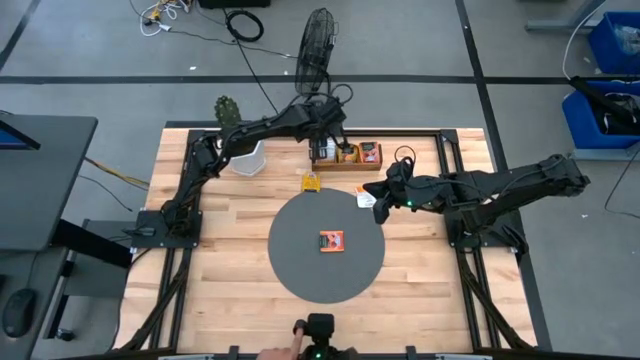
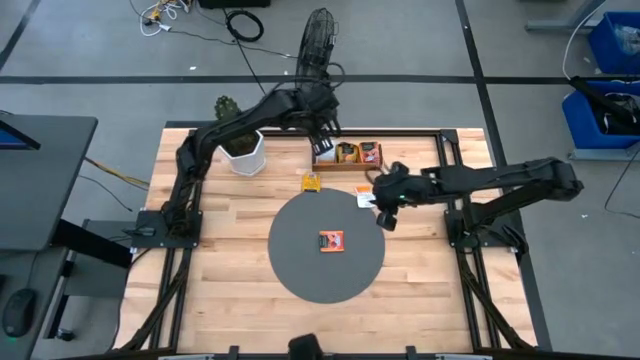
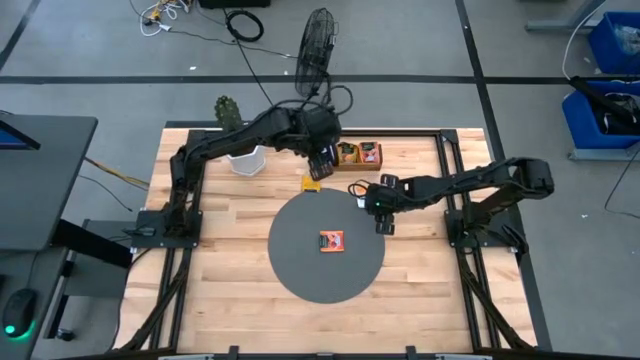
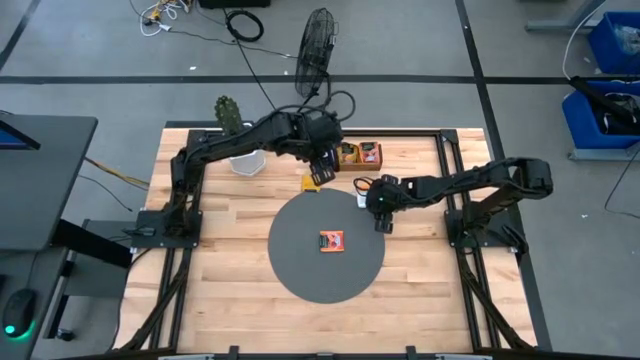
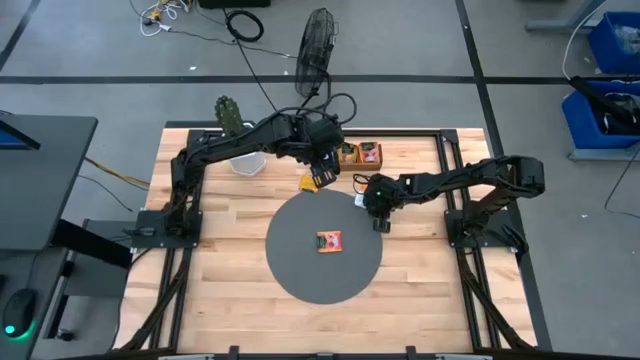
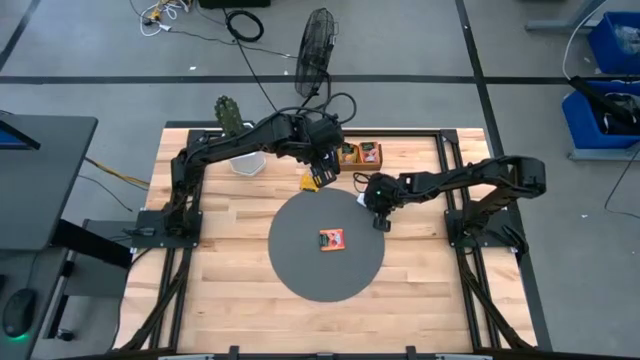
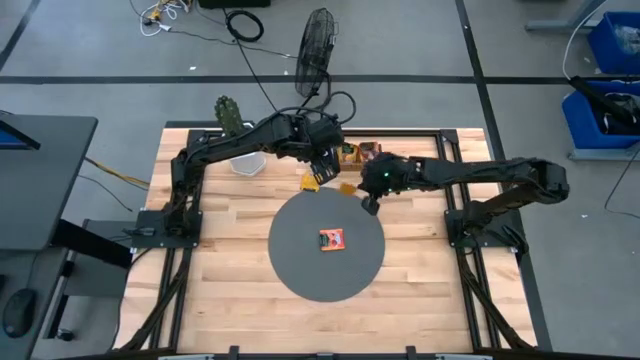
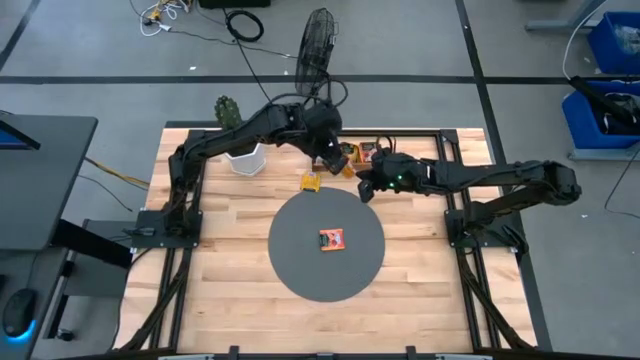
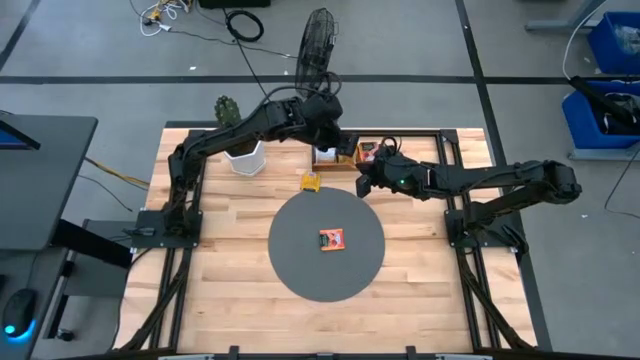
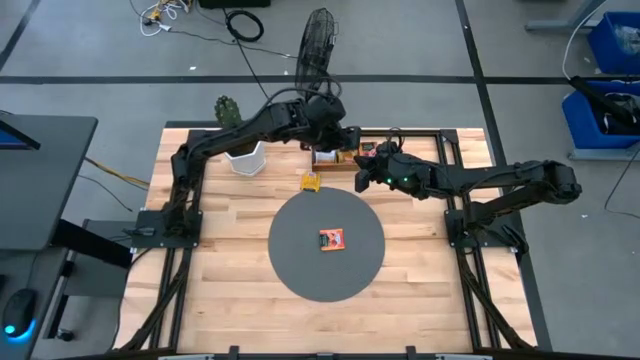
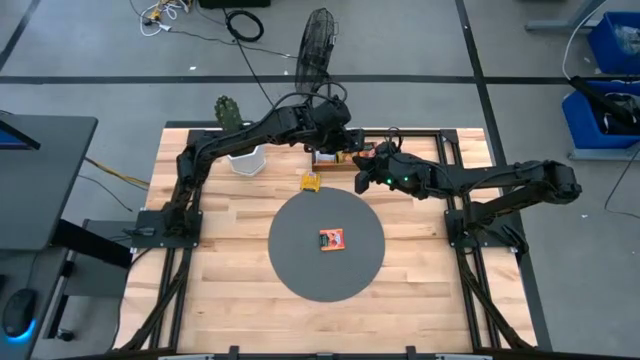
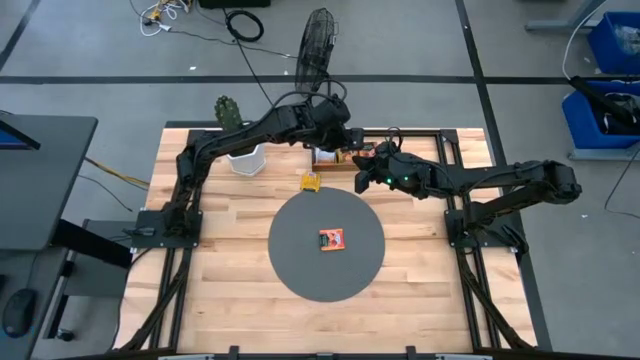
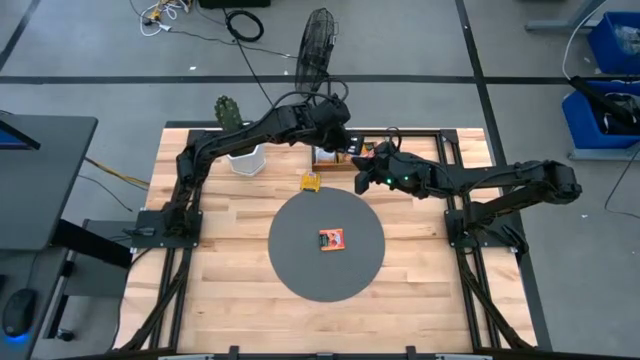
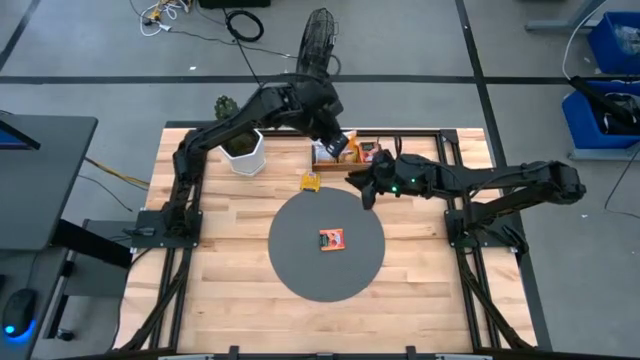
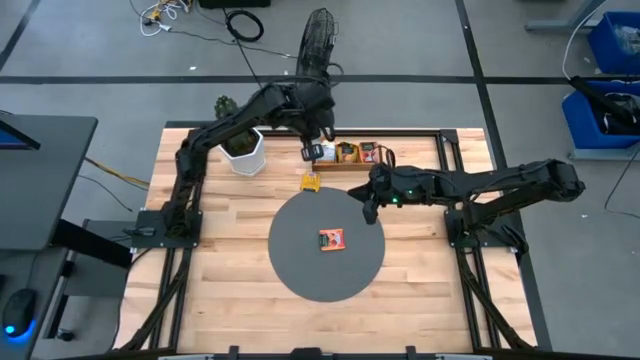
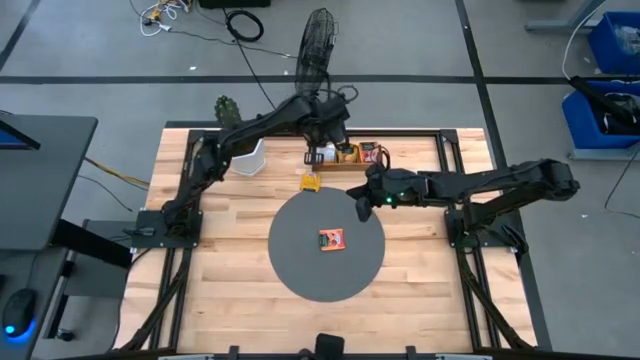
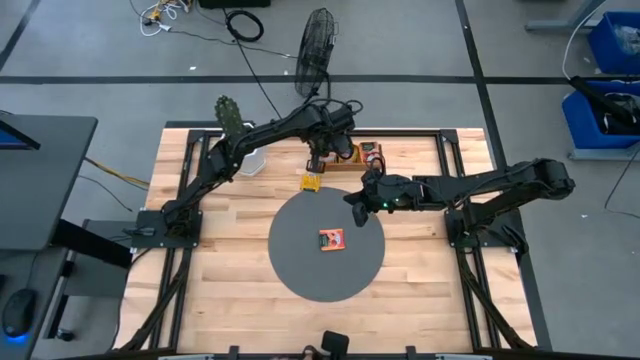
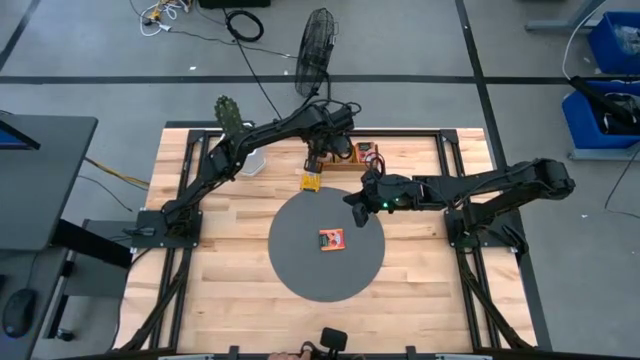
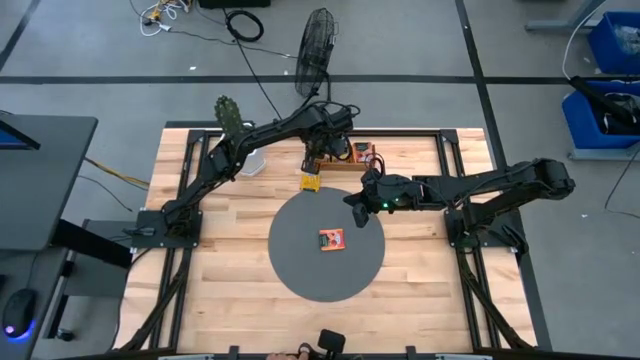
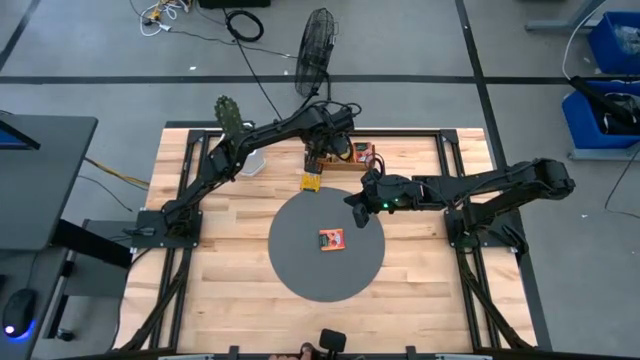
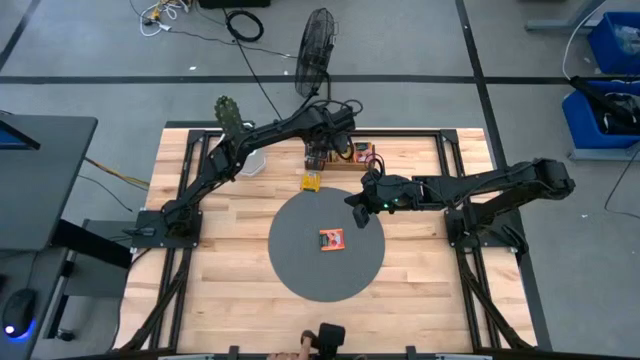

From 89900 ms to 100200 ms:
Task: Pick & Place Tea
Put the white tea bag into the left section of the wooden organizer

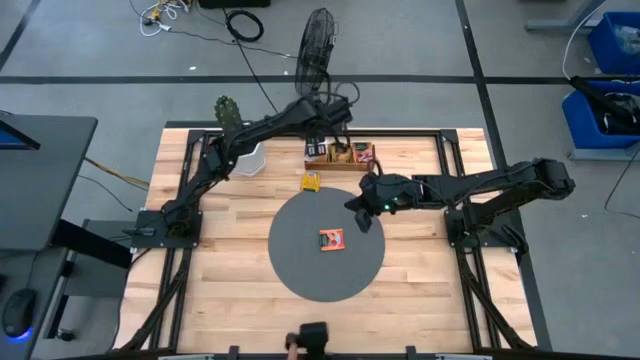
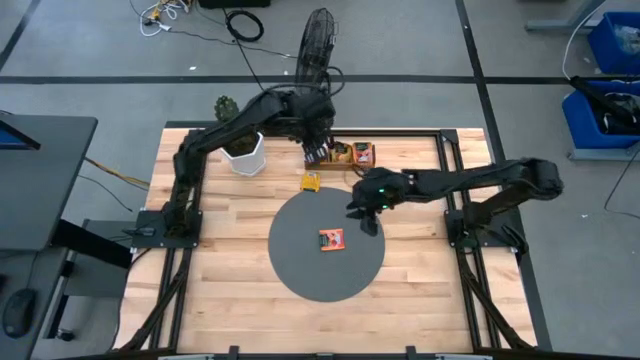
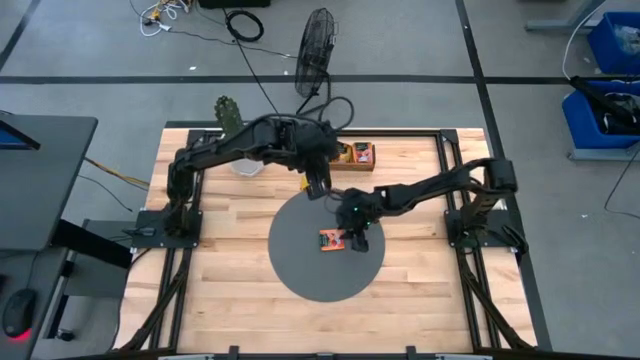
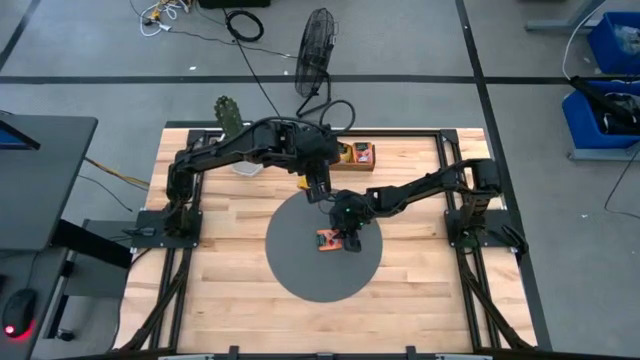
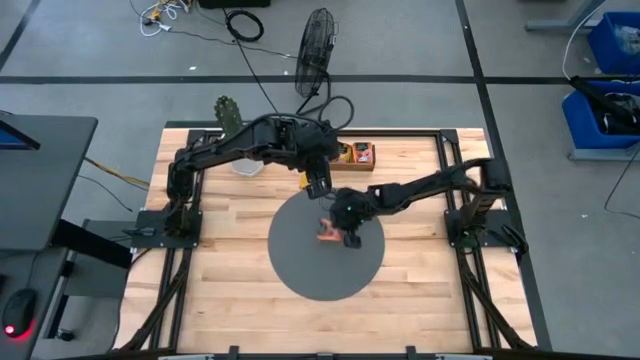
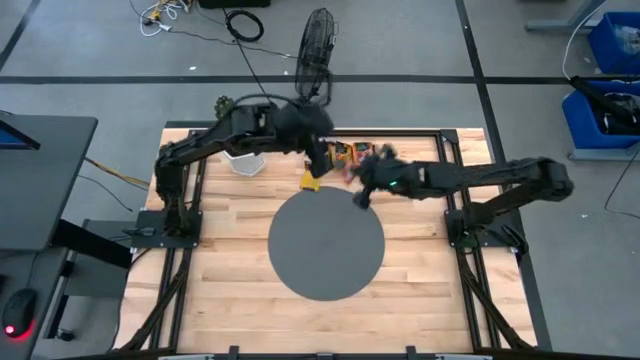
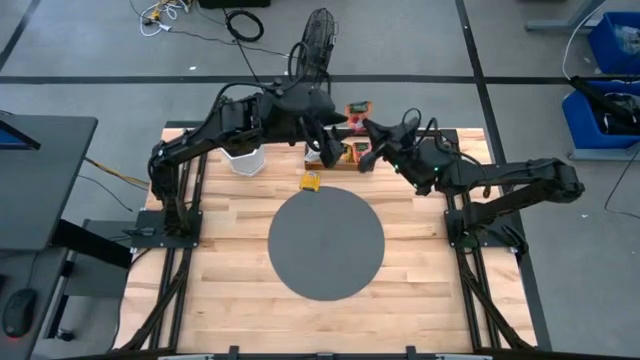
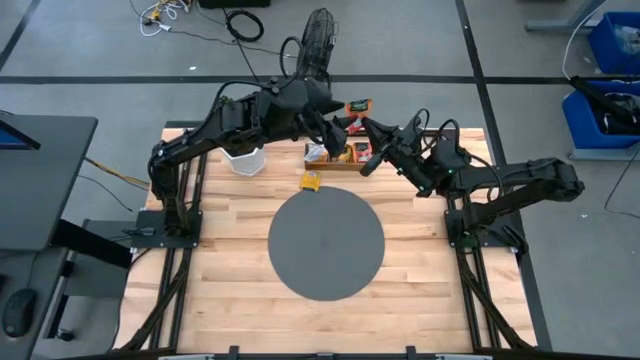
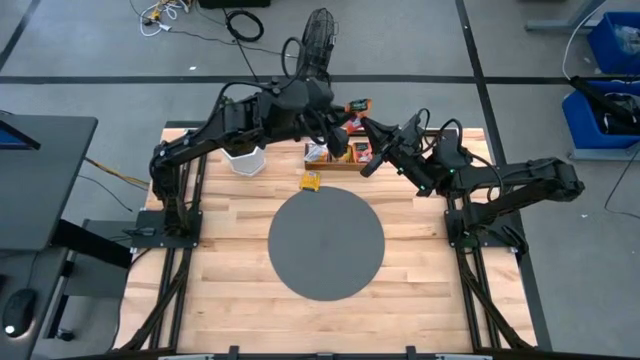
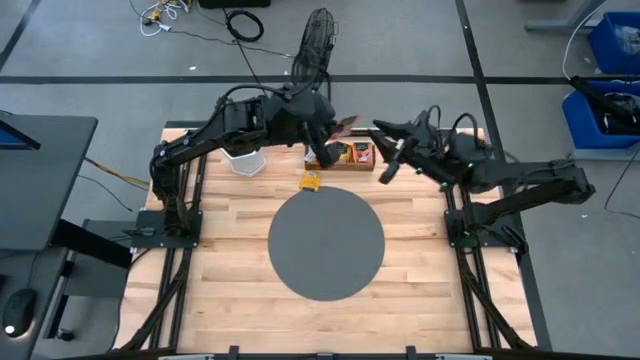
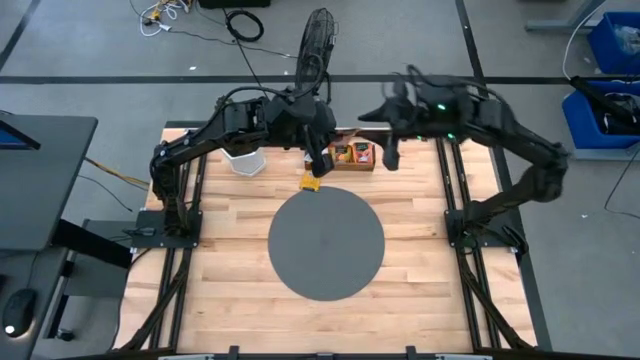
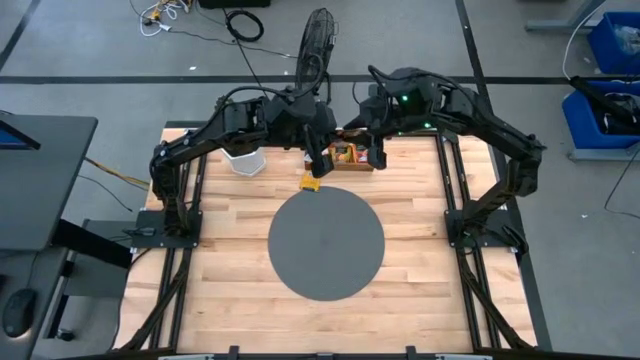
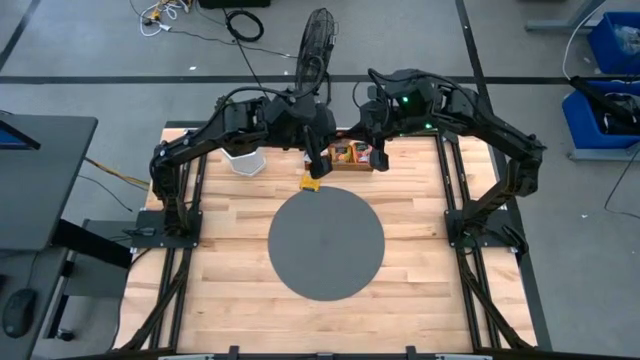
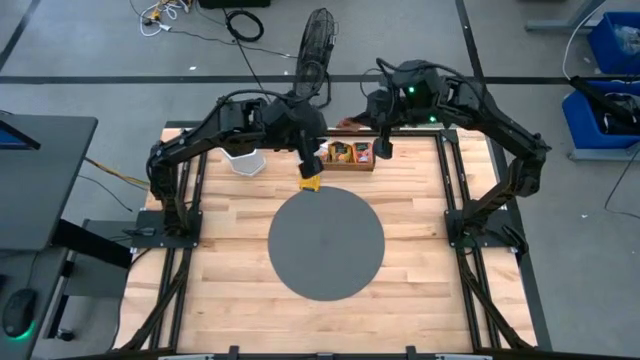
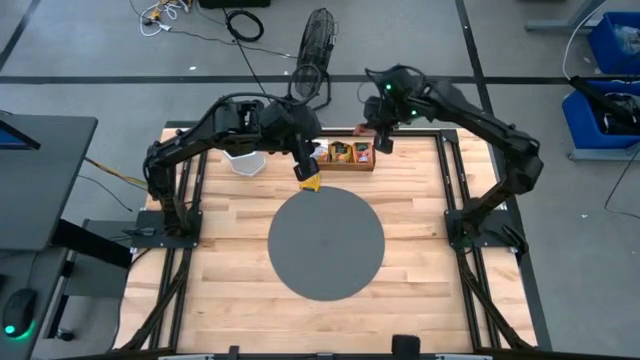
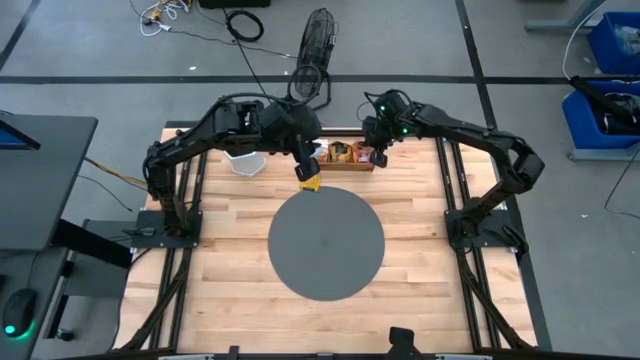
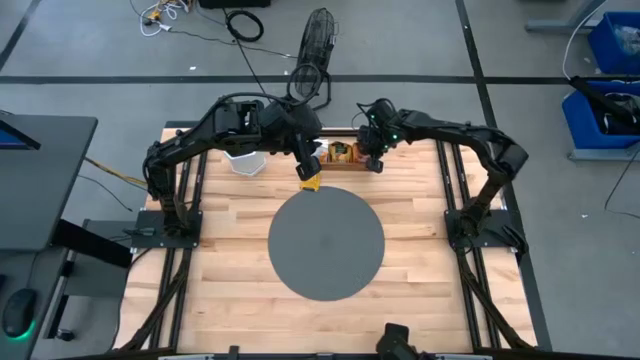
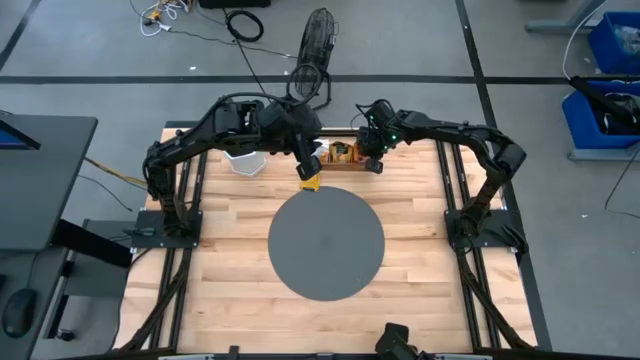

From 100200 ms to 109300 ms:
Put the yellow tea bag into the right section of the wooden organizer

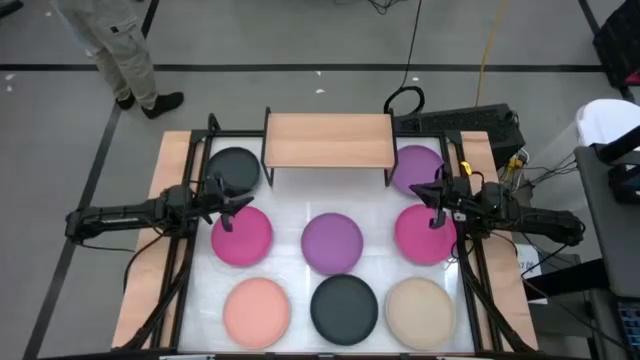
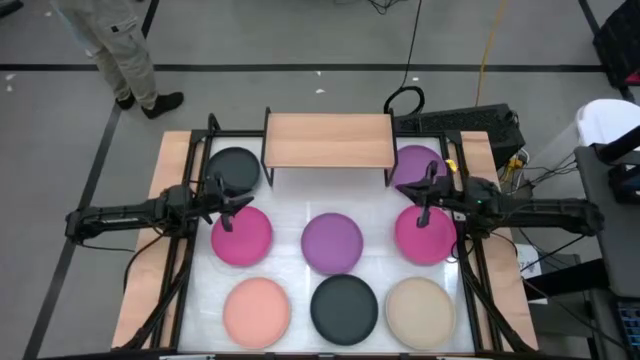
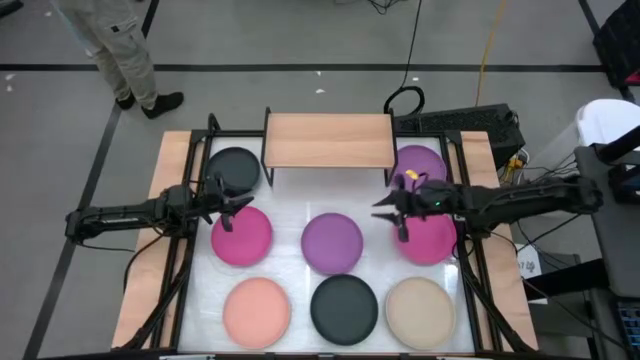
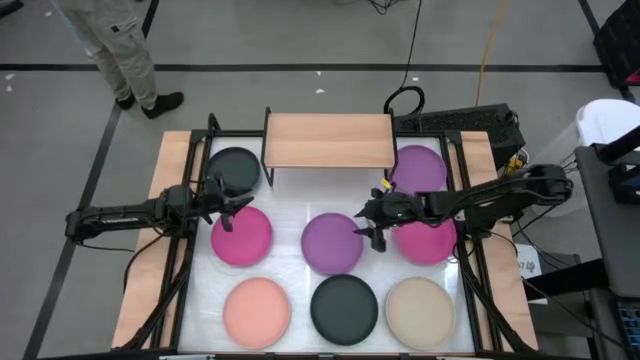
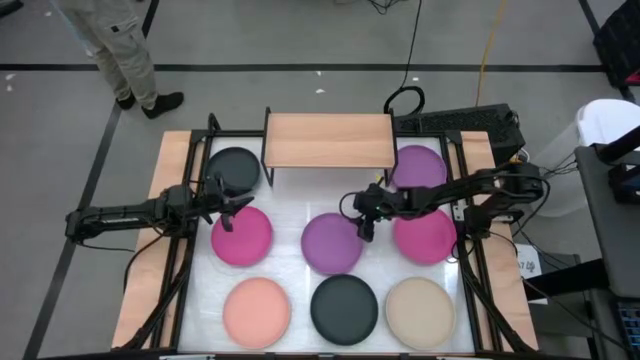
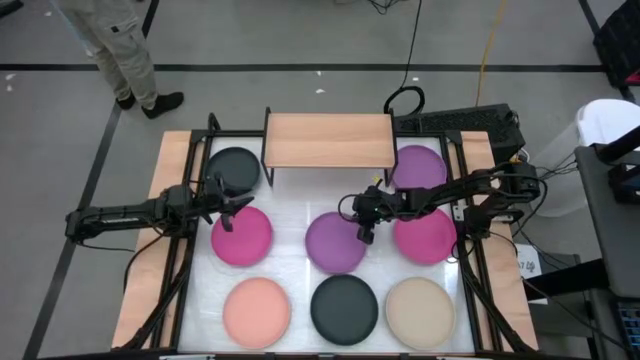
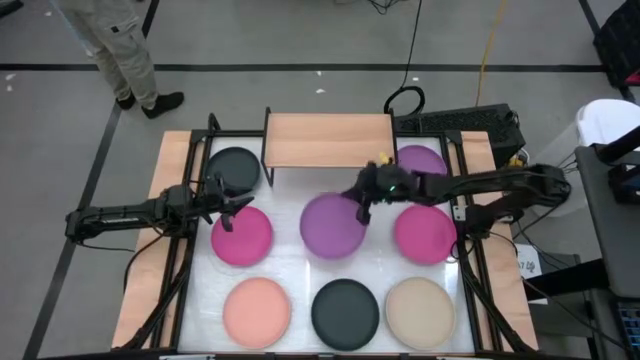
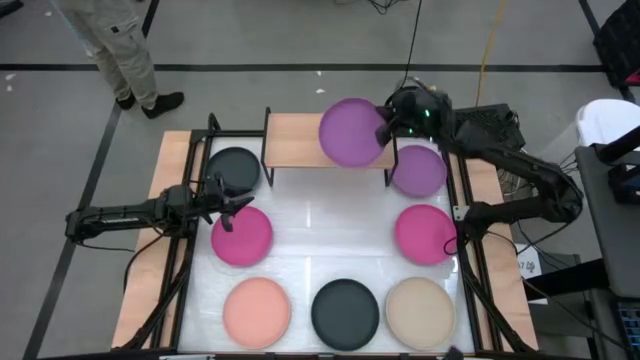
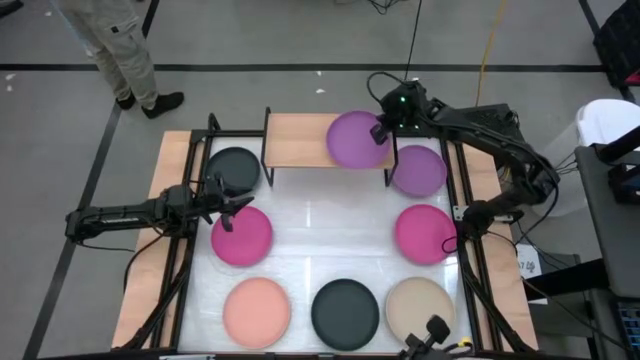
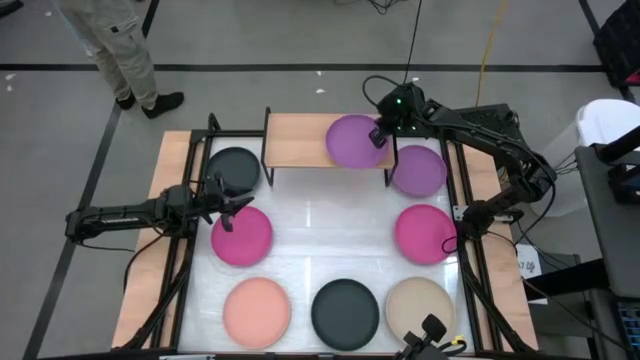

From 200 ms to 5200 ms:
Task: Place and stack plates onto a shelf
Put the bottom purple plate on the shelf
